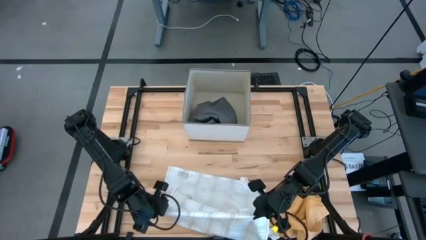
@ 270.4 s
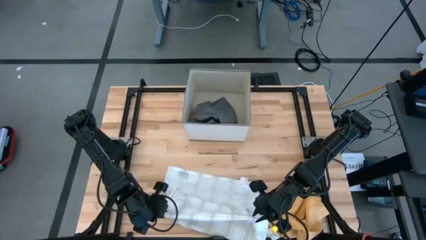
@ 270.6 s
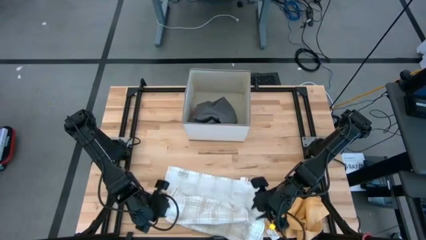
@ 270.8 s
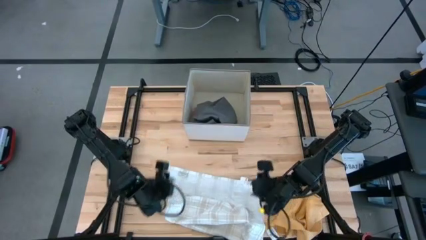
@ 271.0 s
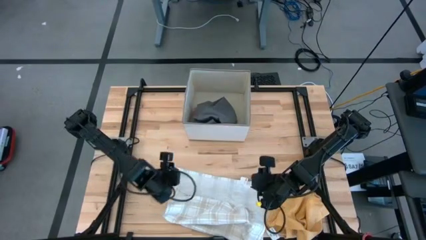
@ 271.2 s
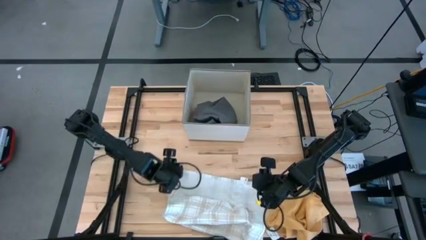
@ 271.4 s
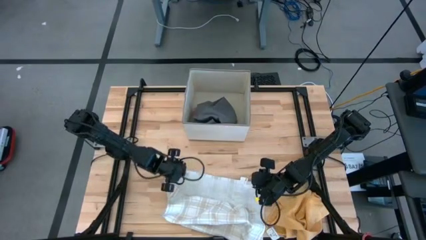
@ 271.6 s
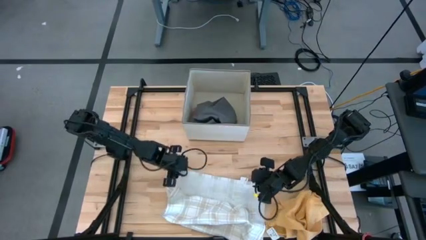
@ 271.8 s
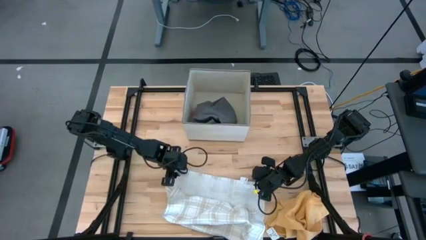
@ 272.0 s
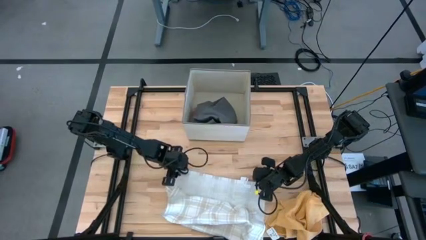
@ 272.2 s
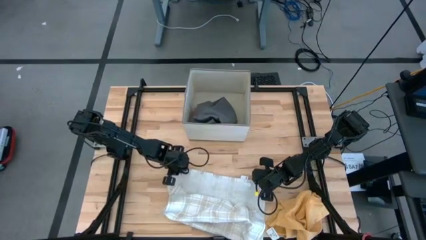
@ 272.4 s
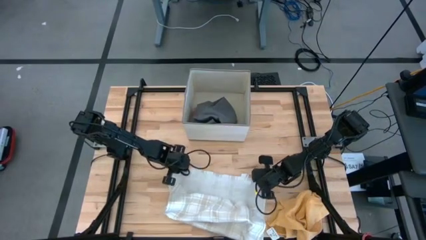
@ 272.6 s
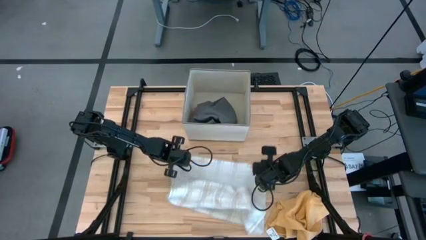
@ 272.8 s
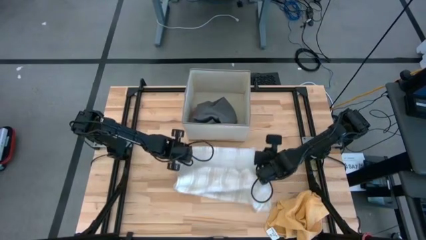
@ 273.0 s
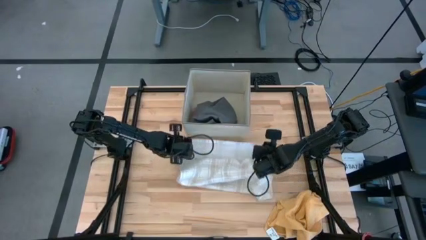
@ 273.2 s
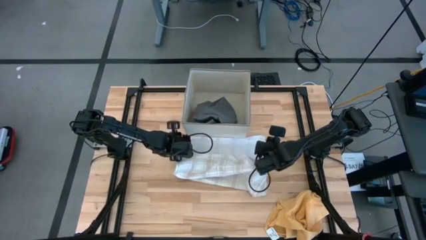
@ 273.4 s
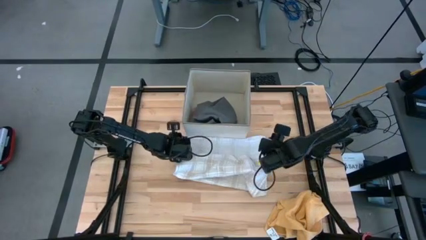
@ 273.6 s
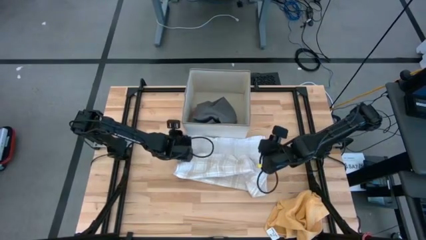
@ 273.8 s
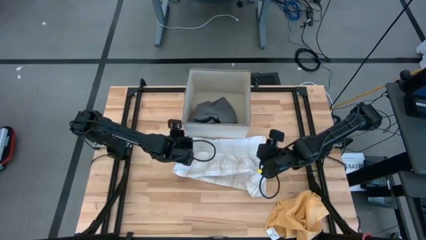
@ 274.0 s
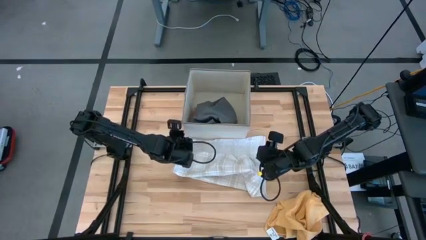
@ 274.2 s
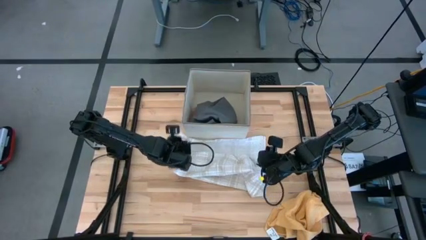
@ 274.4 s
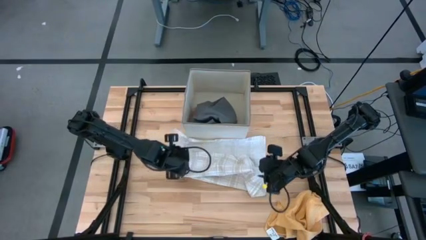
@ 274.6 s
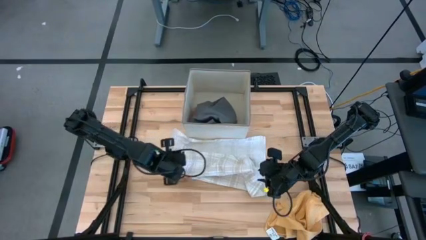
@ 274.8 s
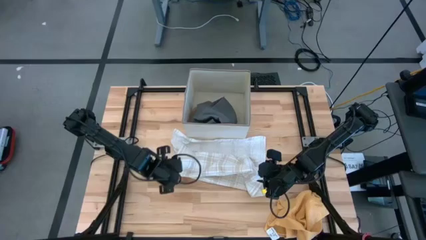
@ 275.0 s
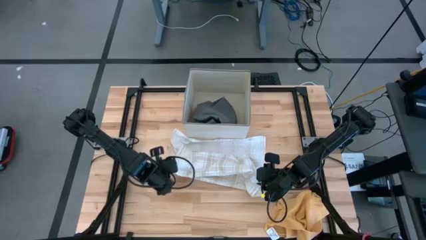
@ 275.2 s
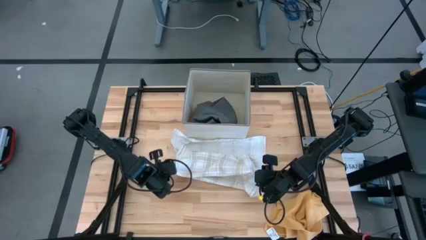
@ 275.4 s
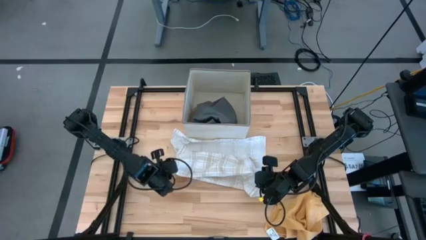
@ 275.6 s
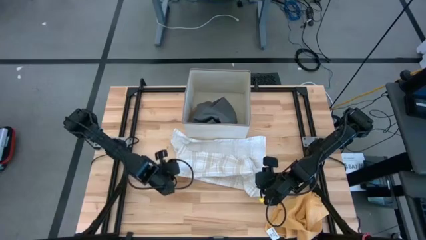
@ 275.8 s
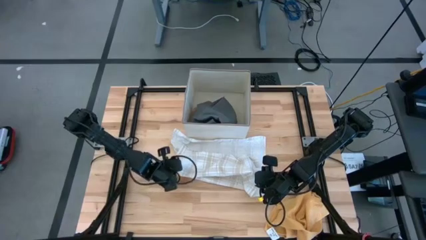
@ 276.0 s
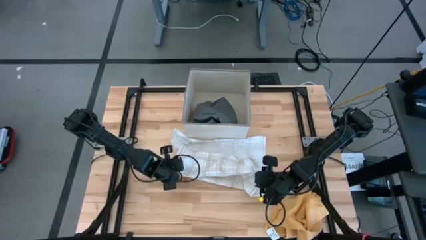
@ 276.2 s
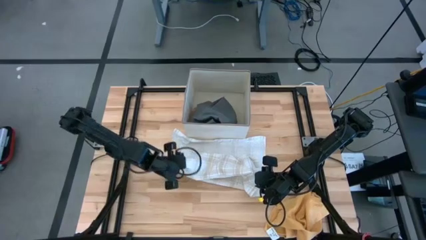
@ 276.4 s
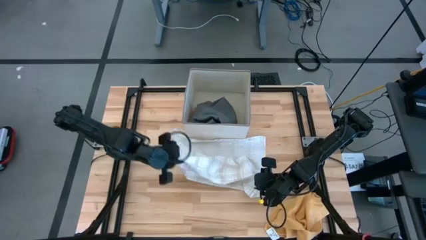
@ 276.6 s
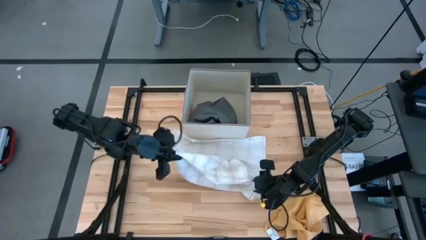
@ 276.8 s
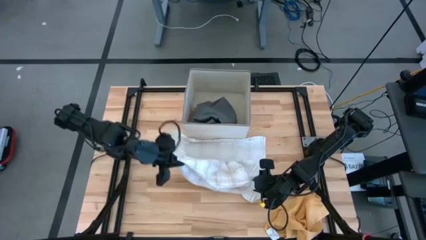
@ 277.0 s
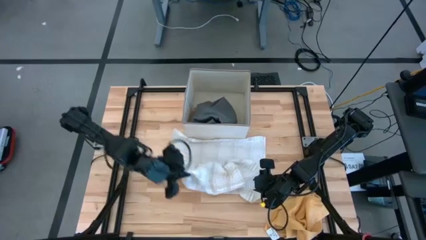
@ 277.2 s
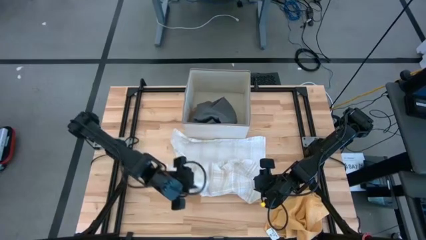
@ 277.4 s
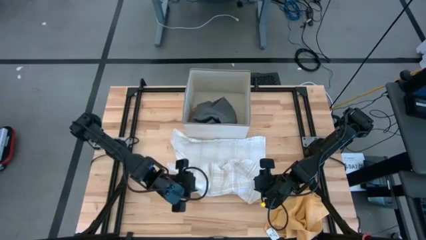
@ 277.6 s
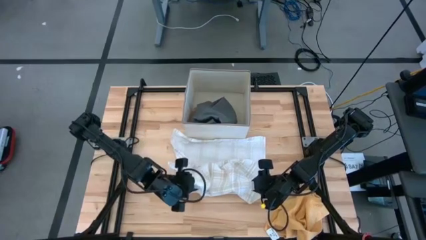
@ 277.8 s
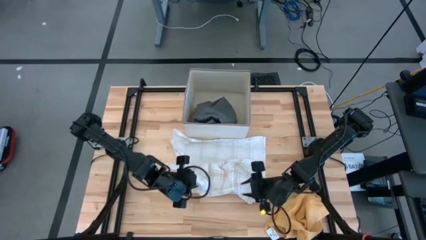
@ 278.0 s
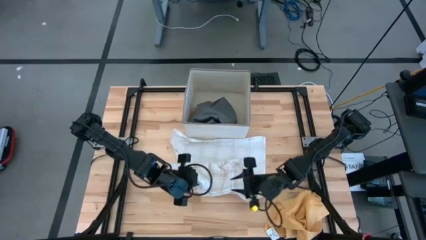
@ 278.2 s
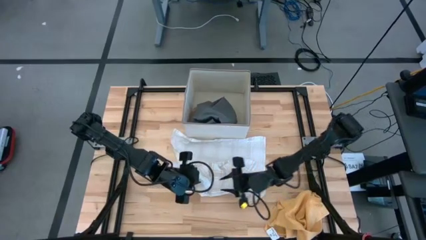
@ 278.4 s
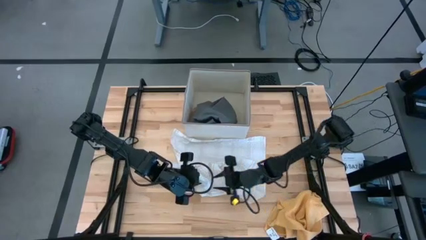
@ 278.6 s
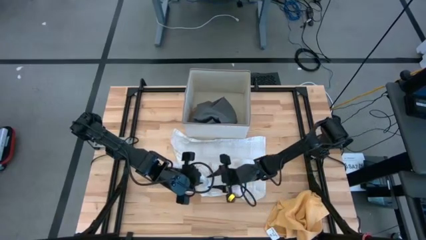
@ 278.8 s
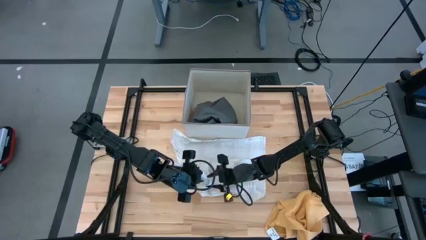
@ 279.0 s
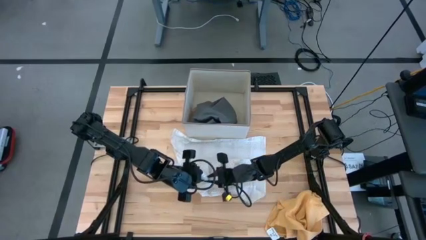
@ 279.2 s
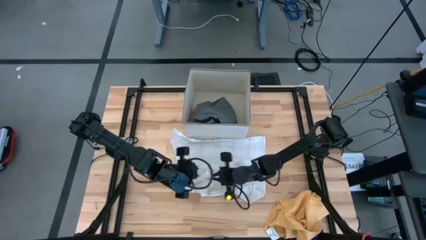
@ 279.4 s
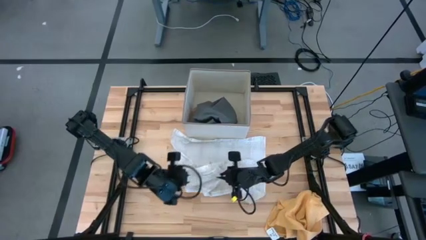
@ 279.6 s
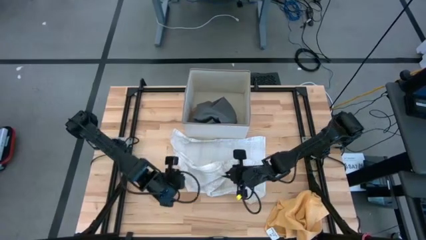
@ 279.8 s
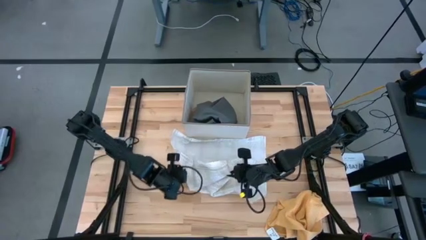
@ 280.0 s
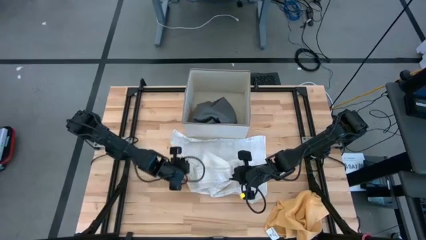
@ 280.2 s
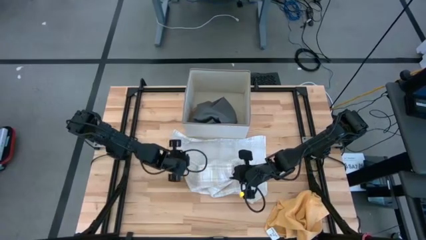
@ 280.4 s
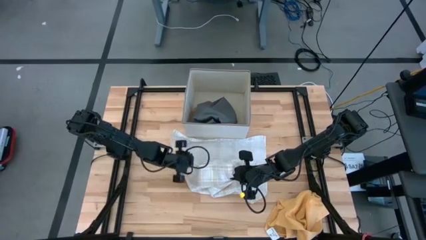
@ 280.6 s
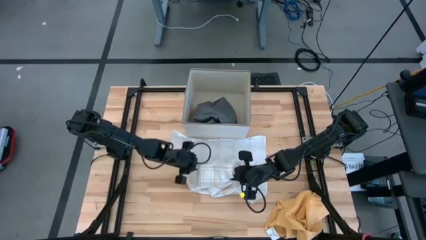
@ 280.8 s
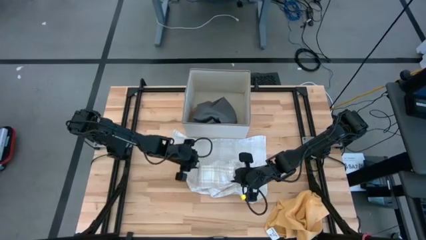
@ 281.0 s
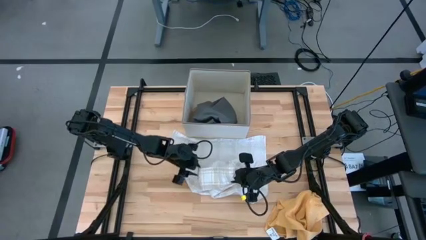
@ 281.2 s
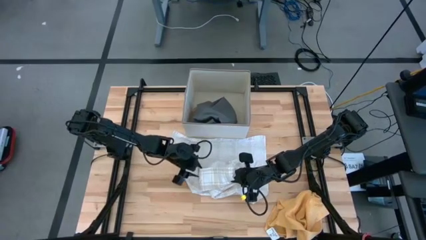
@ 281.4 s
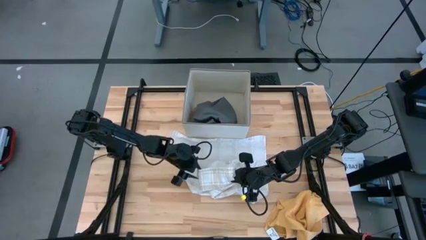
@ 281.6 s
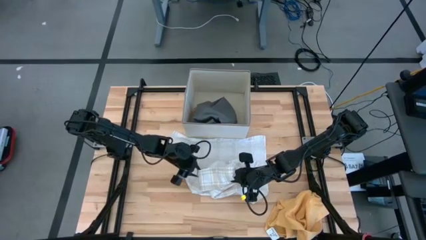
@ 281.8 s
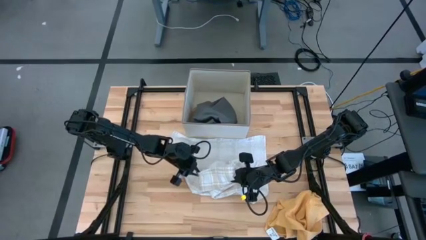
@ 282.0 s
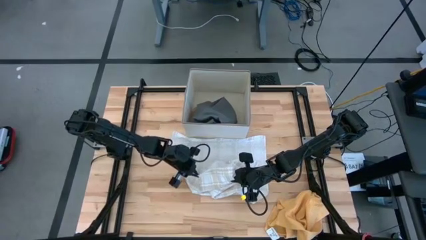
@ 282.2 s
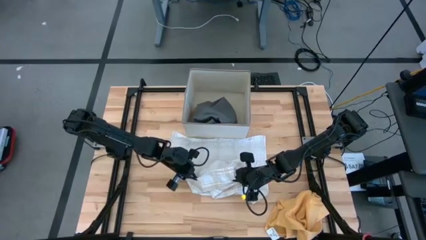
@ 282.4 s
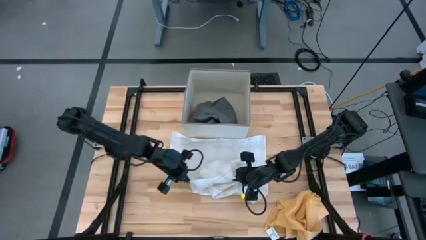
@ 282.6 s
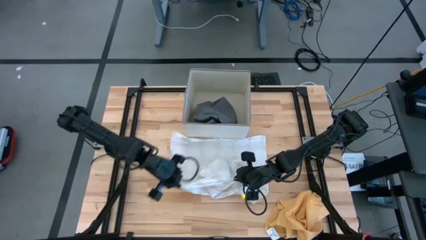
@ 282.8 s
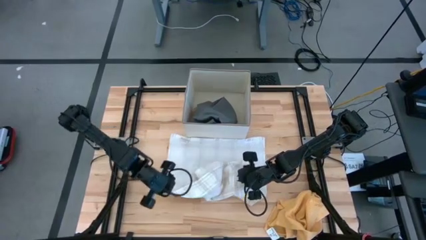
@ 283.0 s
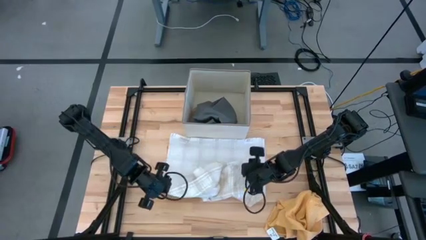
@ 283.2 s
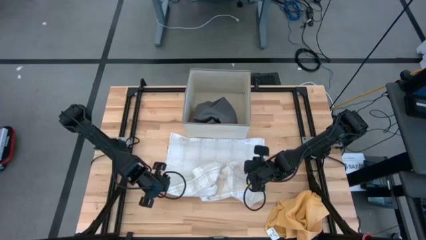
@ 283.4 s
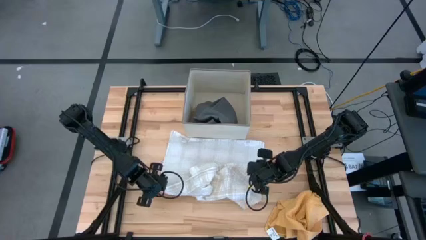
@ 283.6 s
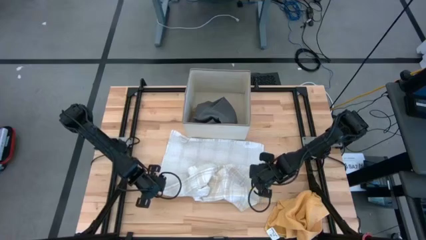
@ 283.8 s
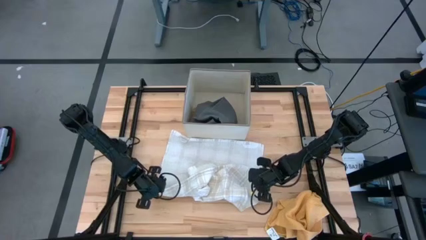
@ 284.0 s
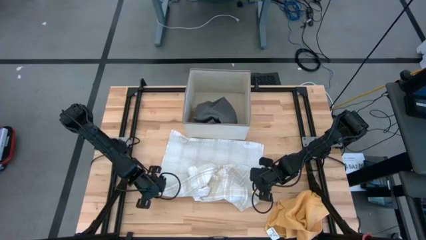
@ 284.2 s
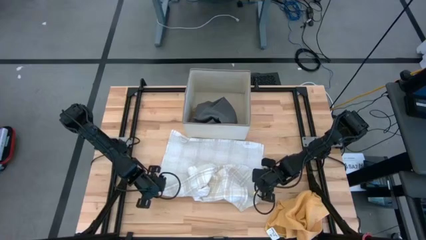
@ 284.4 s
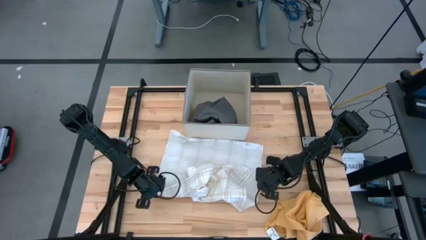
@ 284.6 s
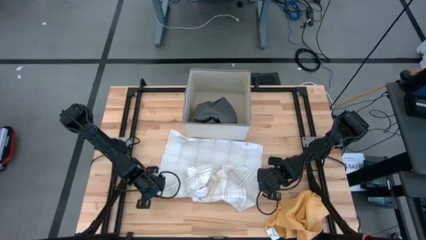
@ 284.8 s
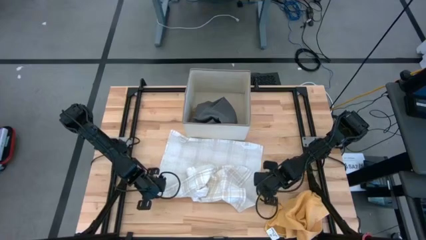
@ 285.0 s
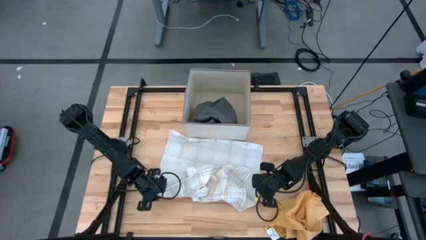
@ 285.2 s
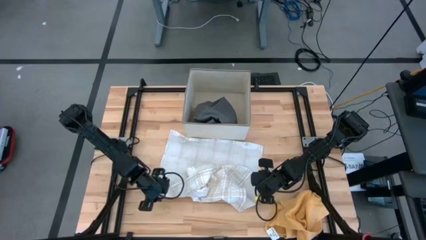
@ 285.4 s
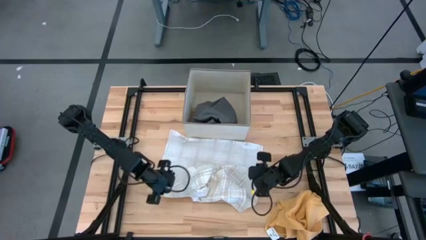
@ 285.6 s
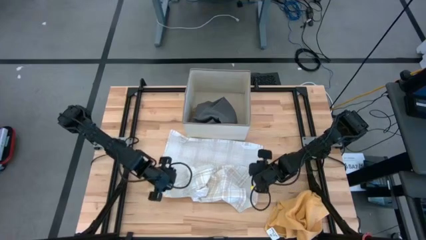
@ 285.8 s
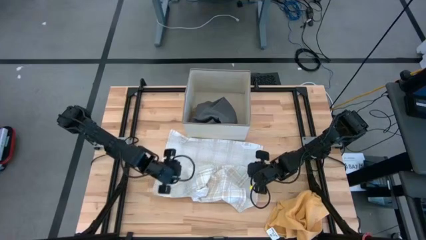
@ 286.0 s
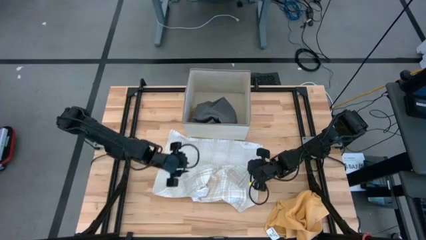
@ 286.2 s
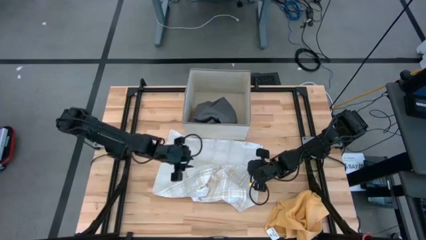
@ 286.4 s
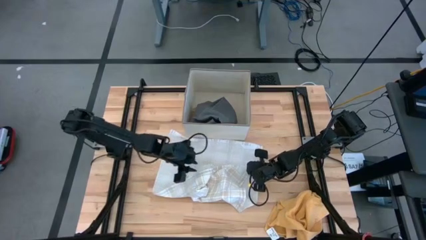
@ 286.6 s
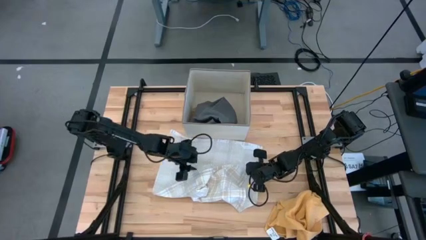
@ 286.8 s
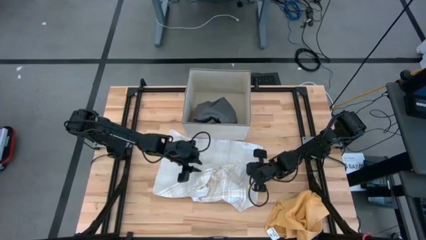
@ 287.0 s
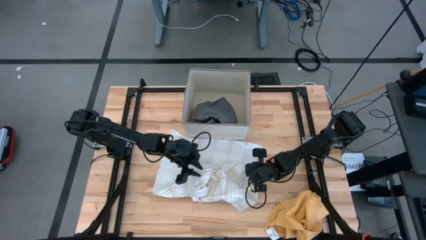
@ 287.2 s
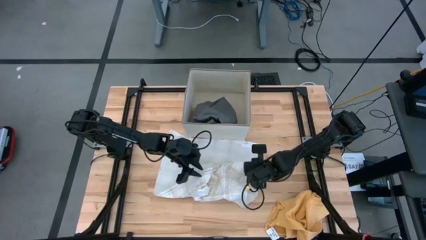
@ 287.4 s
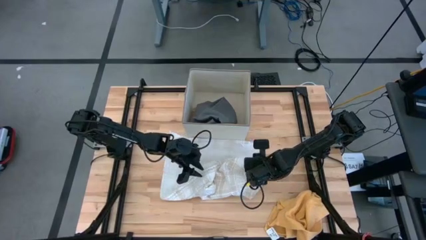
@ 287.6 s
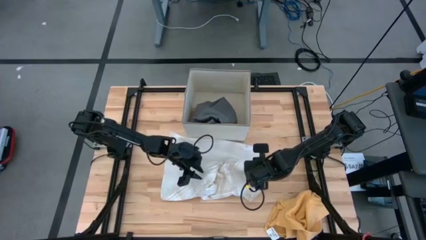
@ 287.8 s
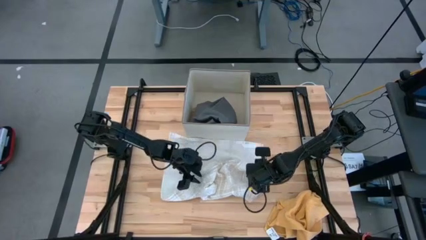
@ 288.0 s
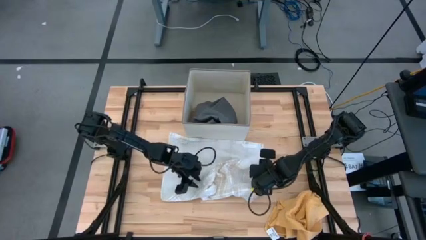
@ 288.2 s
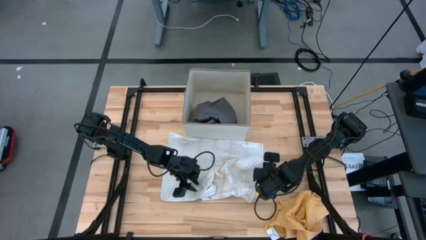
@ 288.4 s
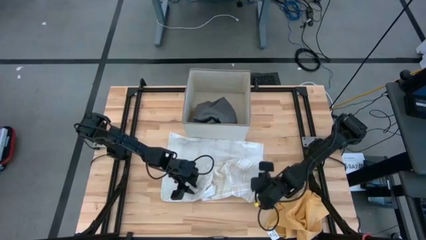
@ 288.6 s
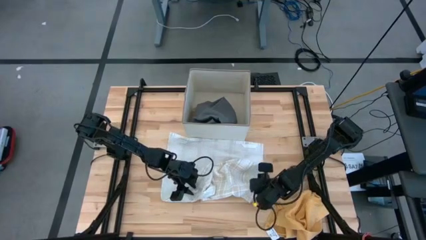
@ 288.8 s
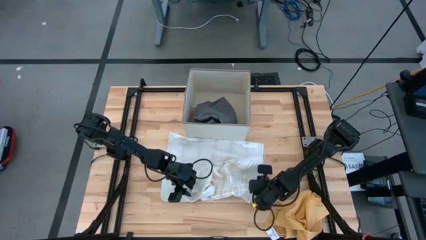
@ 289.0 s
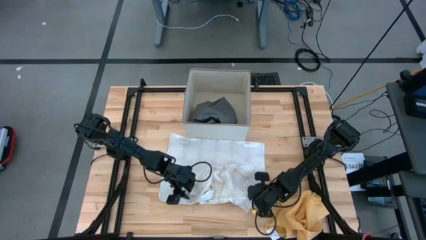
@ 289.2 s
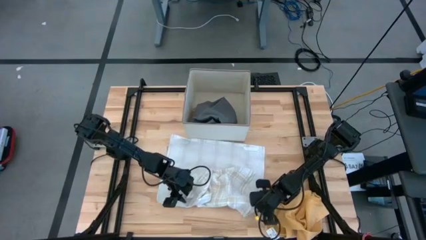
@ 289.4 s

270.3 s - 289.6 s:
Task: Fold towel
Fold the white patterned towel
